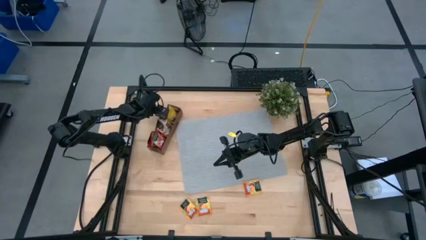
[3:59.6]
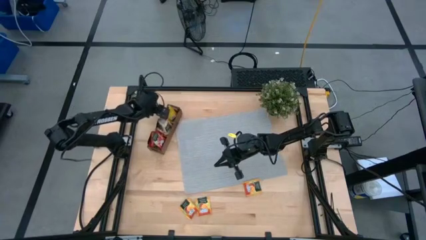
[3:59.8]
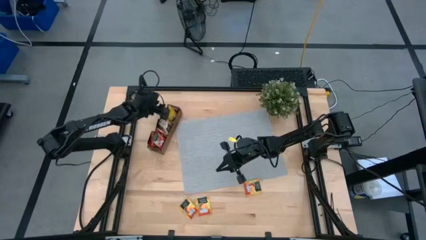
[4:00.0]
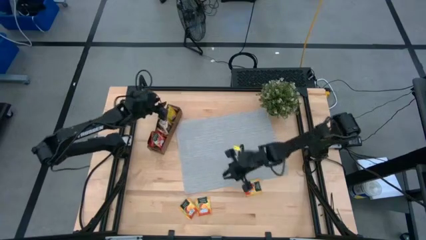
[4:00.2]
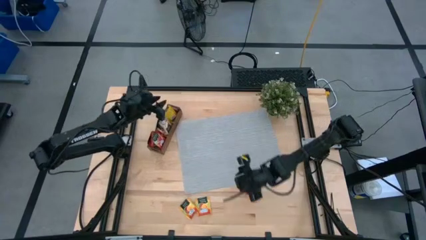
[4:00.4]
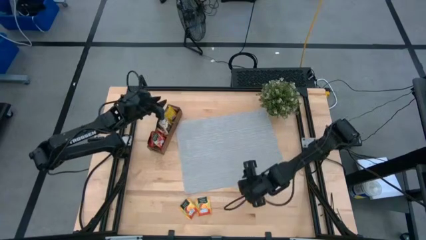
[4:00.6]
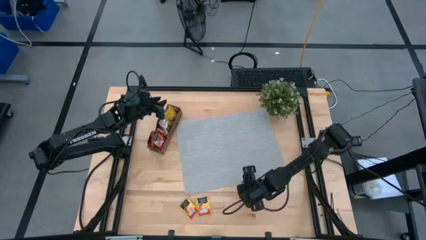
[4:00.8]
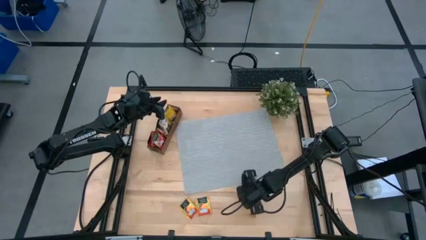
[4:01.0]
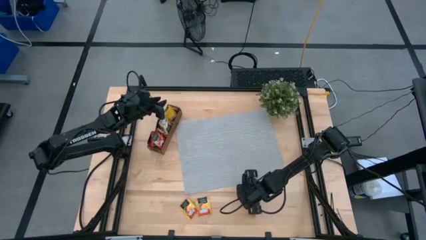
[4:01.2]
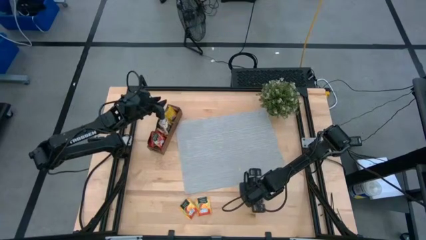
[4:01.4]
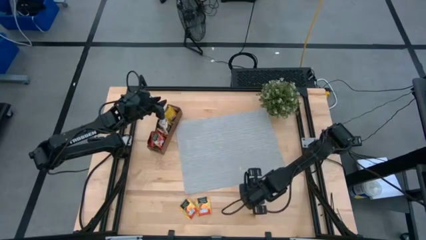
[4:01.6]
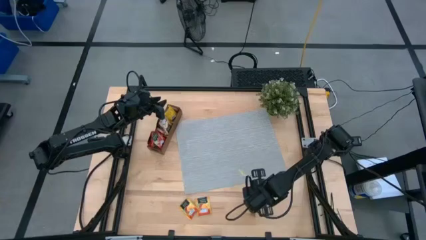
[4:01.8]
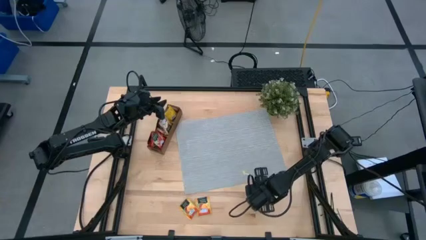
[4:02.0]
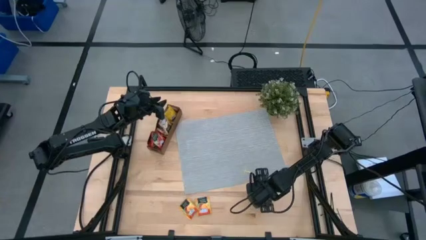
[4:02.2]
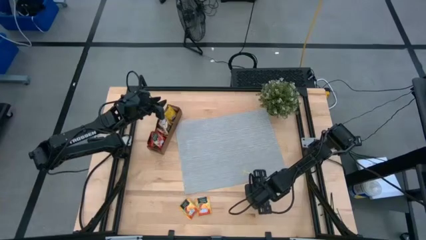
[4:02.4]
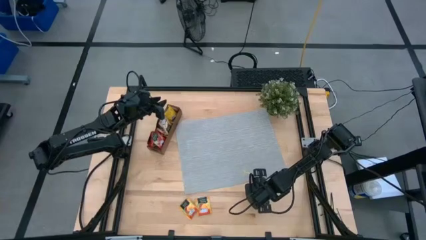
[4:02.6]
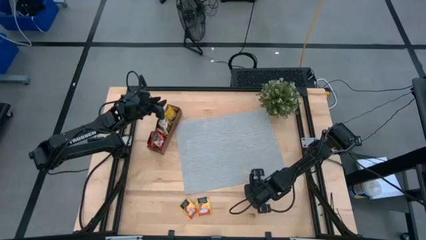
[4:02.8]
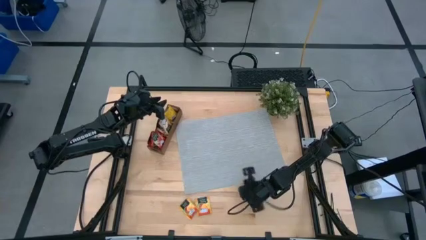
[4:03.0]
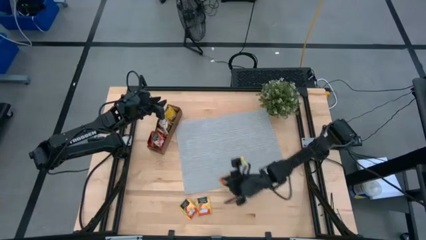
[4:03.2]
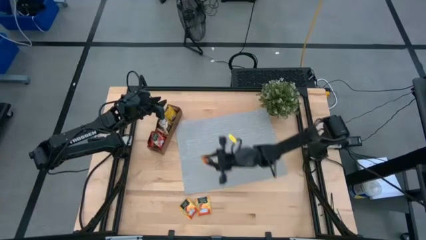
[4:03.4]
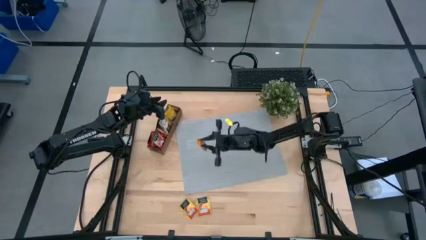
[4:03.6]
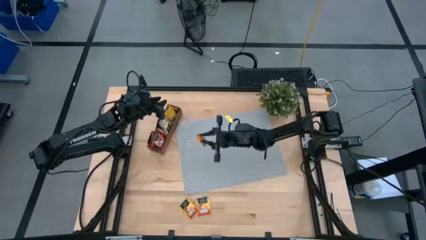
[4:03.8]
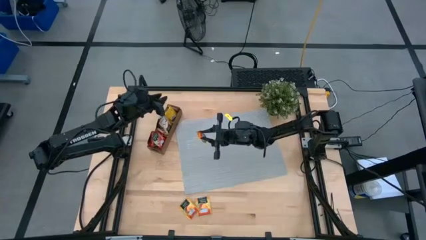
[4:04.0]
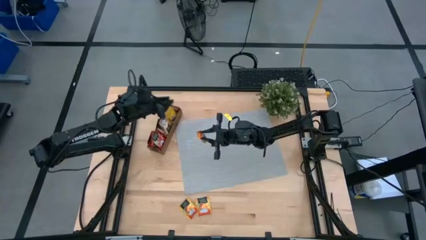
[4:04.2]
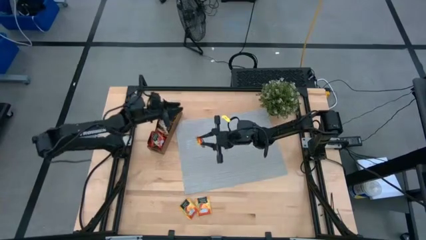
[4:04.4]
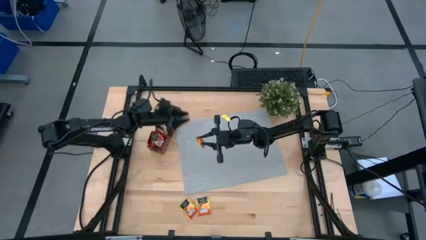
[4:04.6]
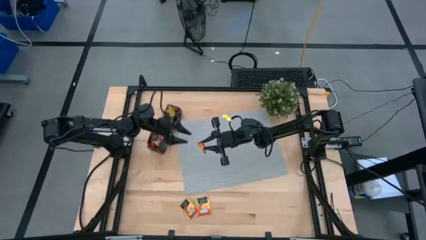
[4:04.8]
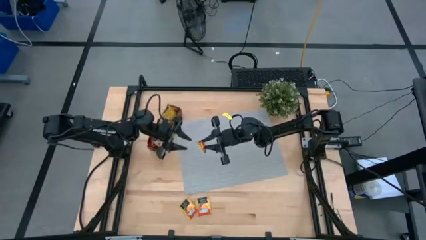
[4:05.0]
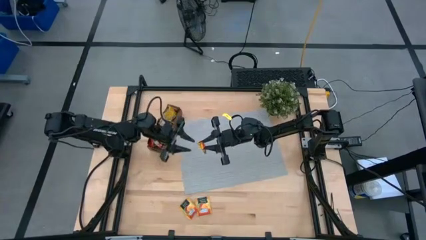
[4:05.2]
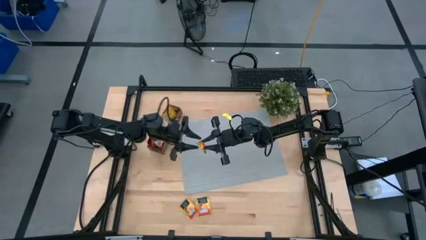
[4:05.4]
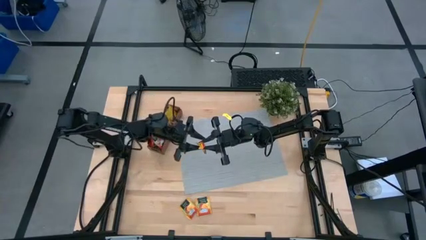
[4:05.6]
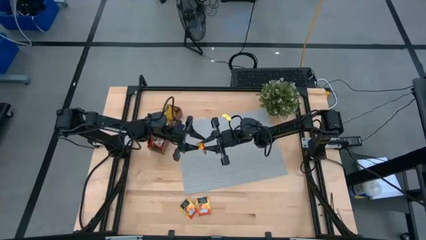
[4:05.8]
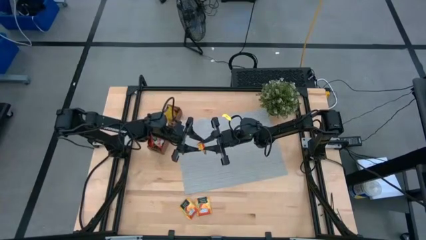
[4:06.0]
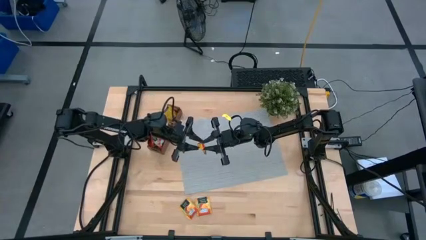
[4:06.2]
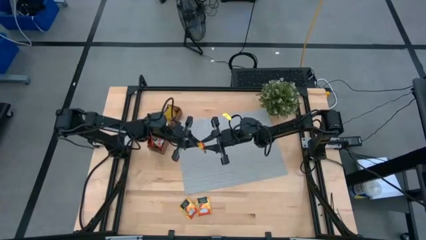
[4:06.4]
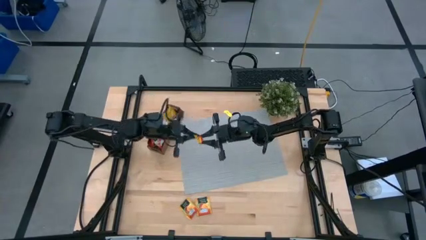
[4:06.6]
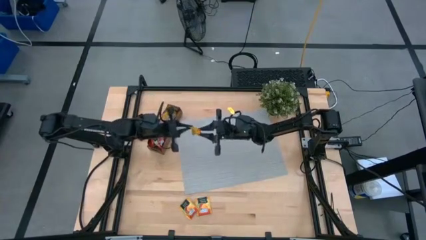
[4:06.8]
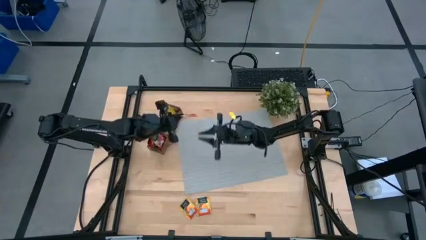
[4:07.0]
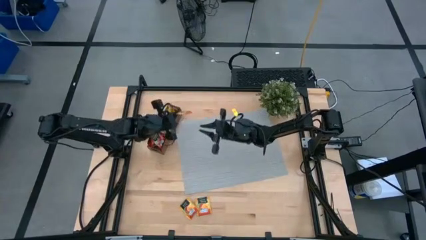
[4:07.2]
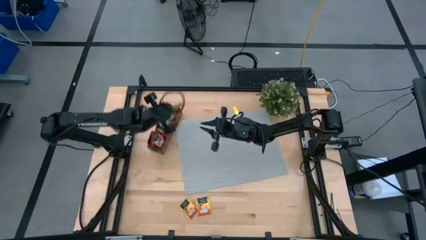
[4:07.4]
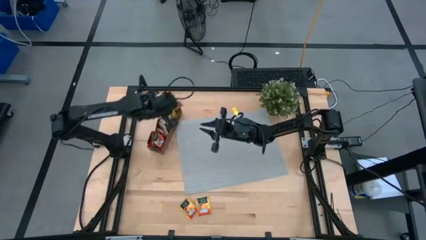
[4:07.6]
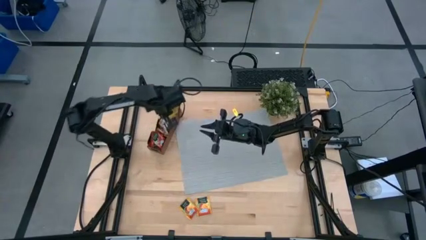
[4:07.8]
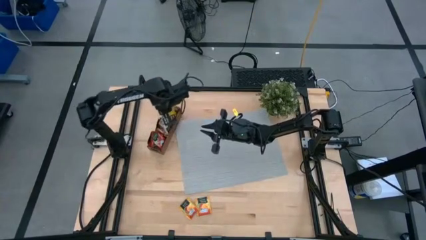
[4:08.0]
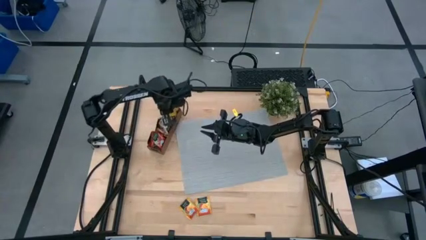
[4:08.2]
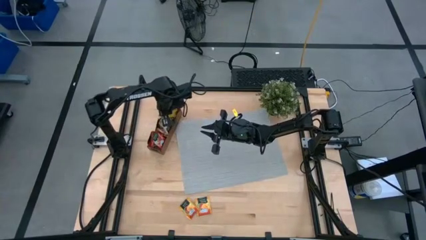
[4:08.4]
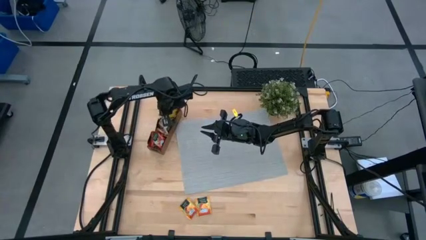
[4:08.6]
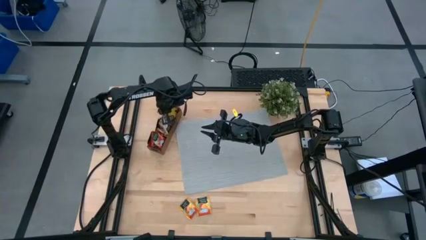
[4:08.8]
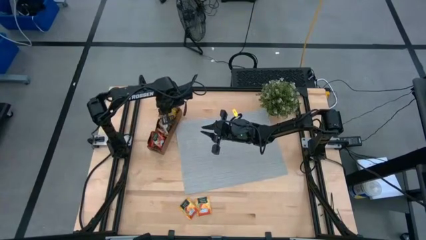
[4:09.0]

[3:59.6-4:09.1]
Task: Pick & Place Tea
Put the yellow tea bag into the right section of the wooden organizer

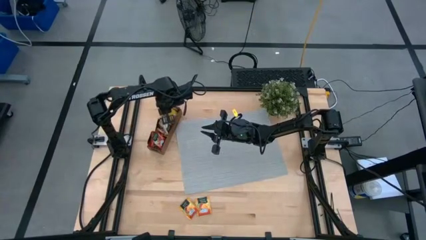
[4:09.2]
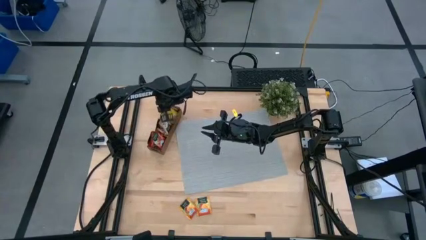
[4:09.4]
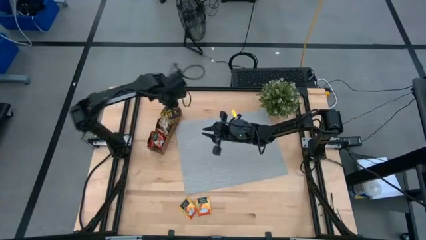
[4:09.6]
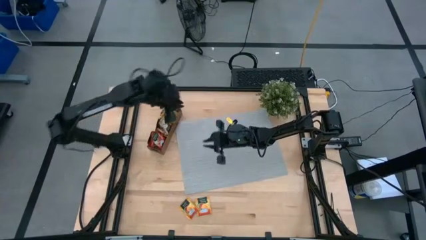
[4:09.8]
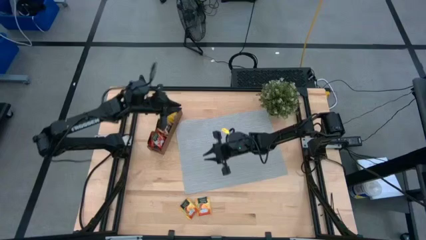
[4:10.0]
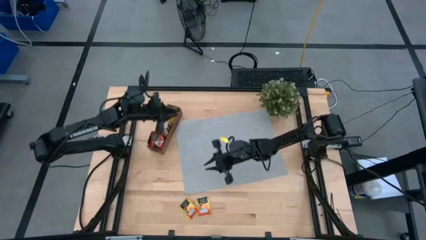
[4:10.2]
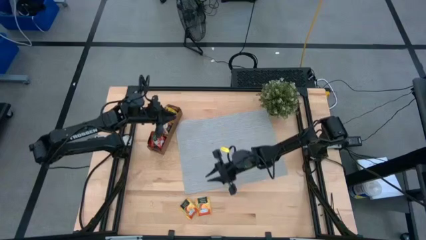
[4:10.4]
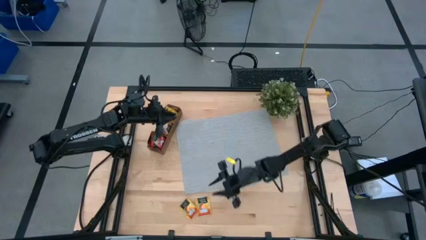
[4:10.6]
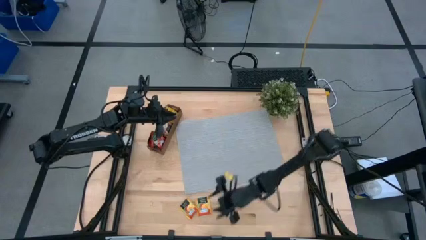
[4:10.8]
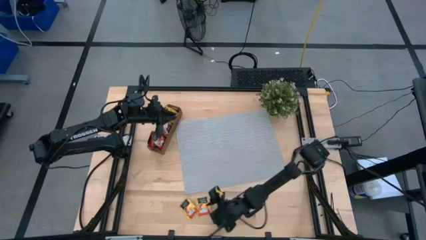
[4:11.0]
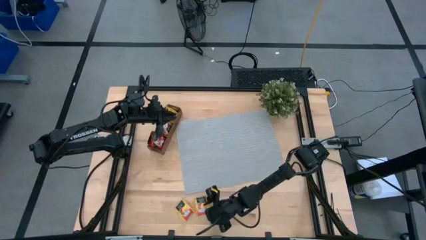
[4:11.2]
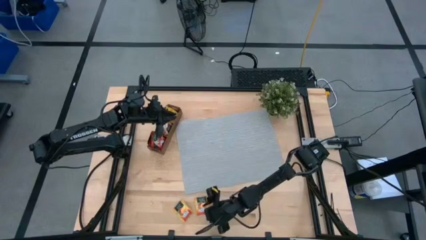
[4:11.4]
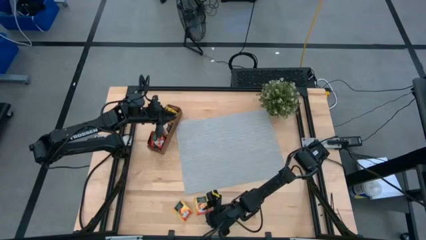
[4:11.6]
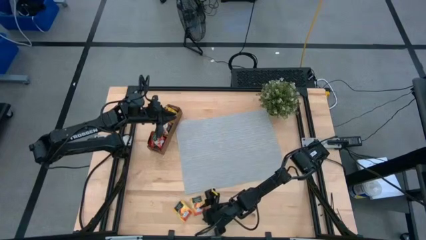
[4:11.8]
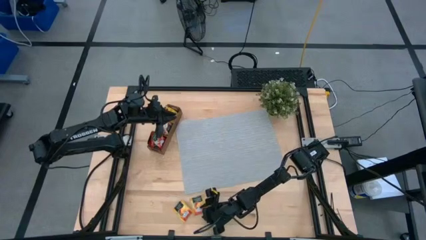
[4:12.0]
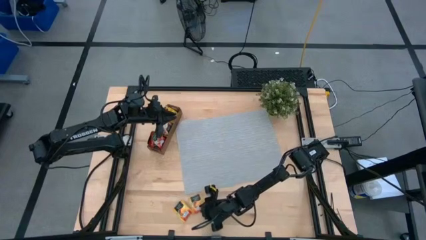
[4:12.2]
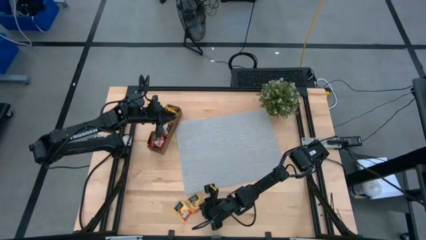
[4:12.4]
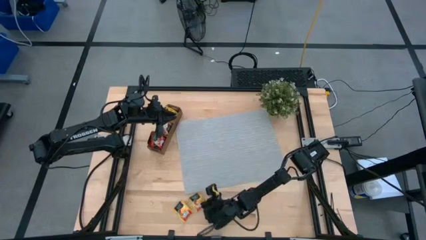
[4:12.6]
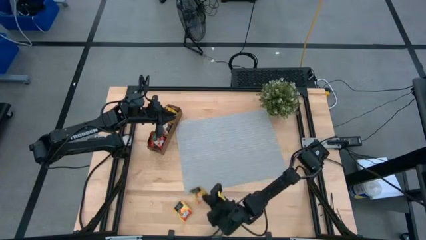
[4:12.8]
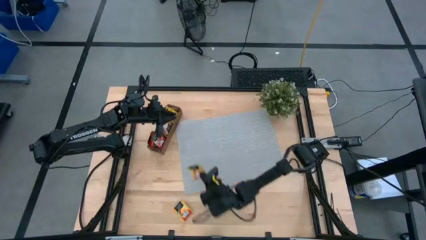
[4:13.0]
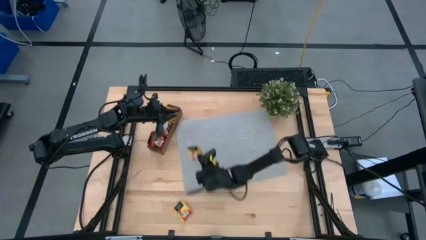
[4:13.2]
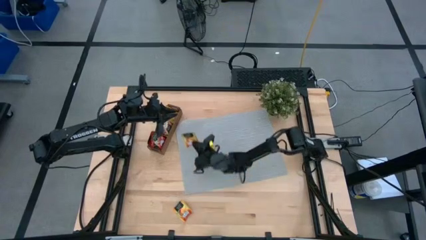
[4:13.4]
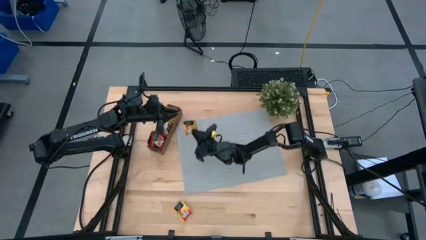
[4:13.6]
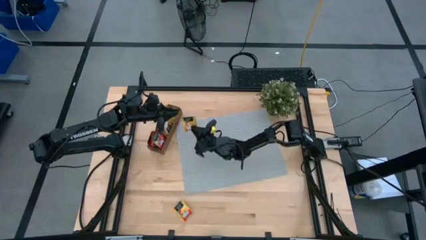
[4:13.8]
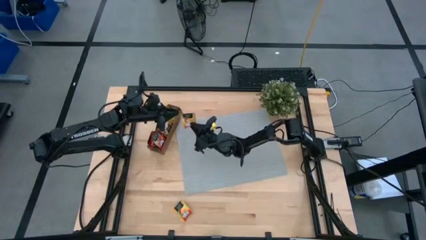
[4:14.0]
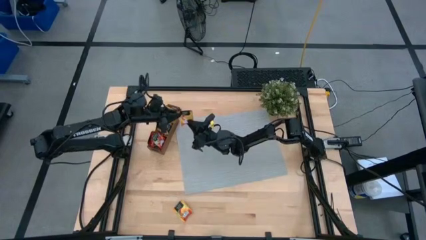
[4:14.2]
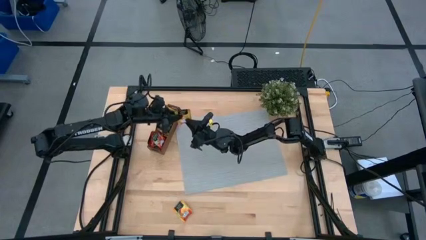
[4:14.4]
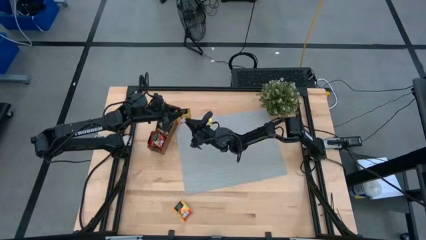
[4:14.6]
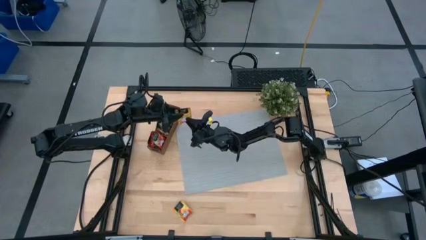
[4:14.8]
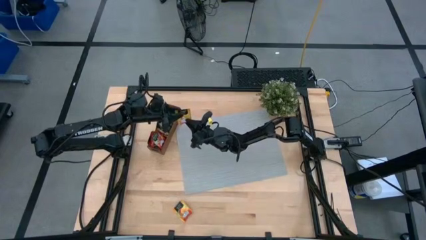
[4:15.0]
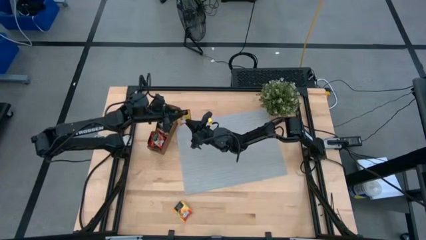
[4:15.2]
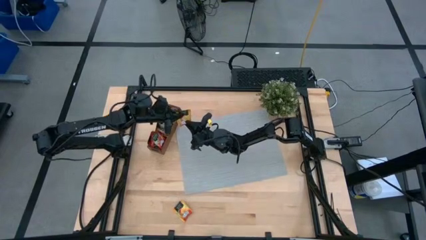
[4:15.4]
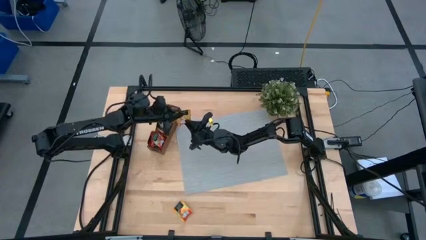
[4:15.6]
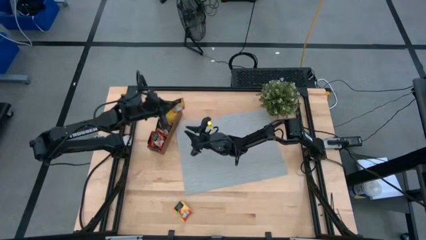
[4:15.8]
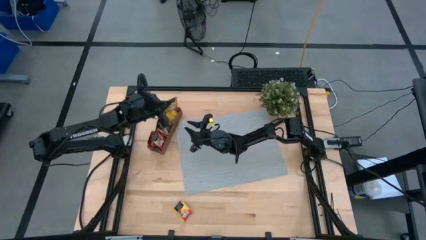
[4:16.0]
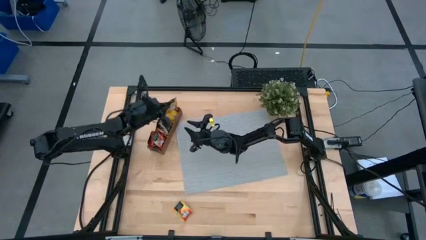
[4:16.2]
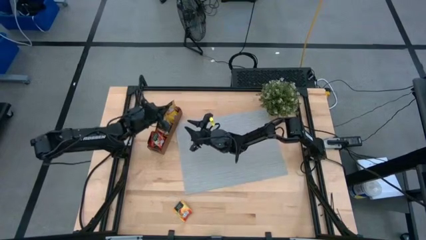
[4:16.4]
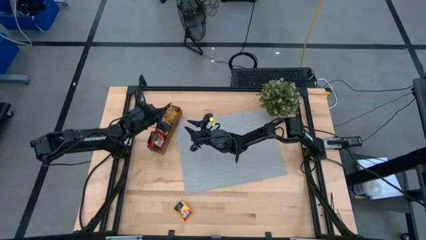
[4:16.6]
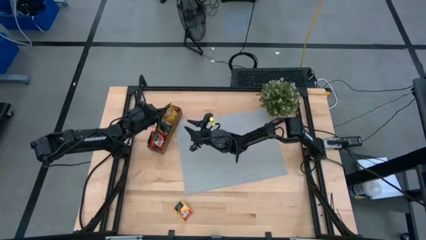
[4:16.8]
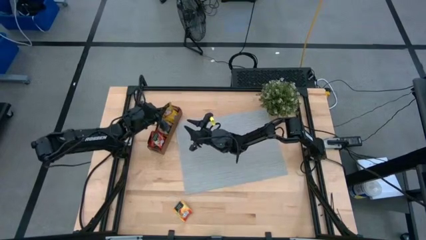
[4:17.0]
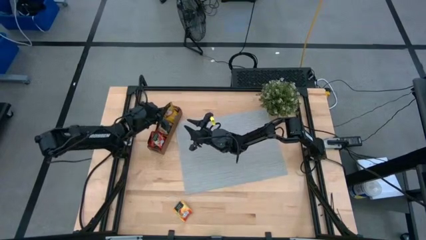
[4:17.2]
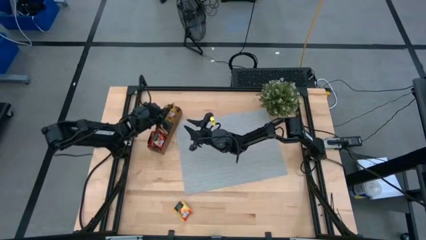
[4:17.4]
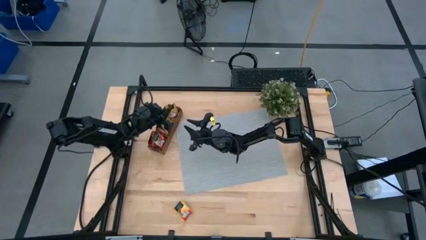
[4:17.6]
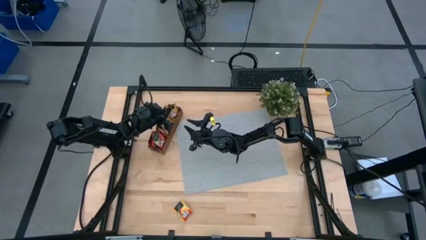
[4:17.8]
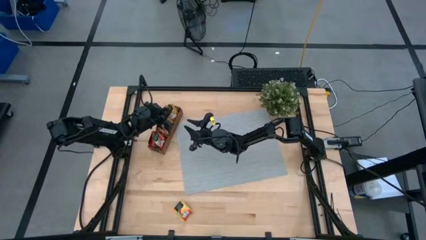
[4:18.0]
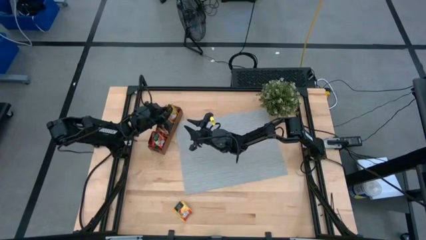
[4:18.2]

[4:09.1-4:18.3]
Put the yellow tea bag into the right section of the wooden organizer
